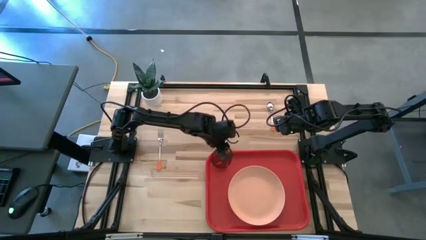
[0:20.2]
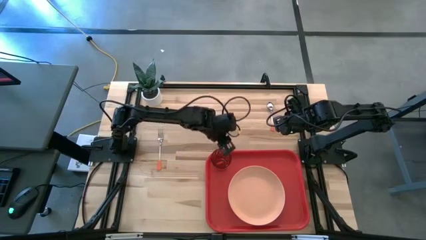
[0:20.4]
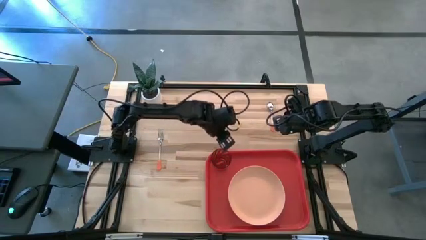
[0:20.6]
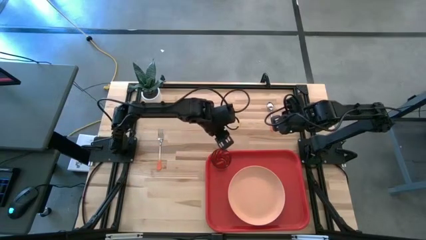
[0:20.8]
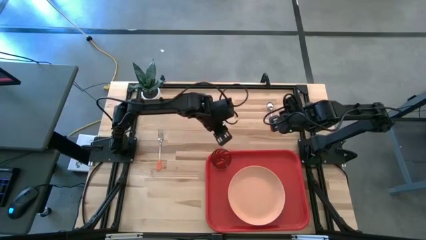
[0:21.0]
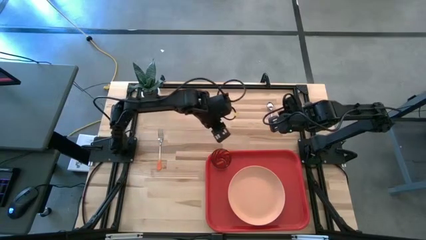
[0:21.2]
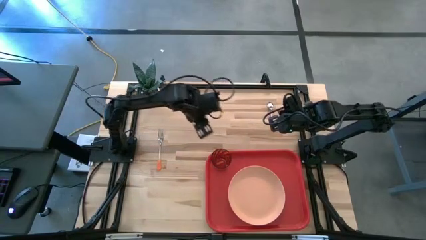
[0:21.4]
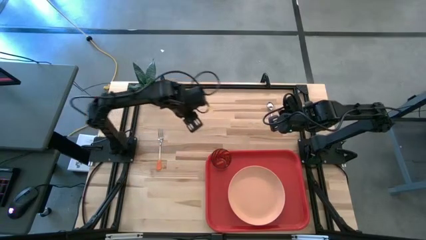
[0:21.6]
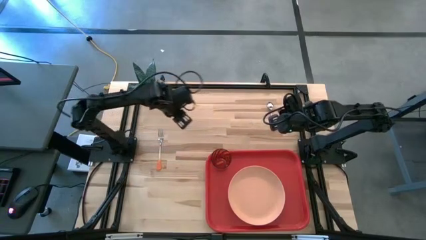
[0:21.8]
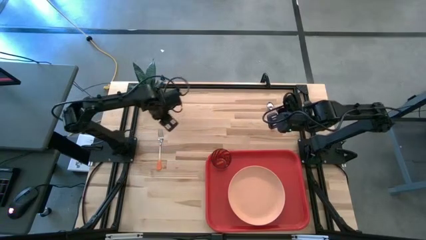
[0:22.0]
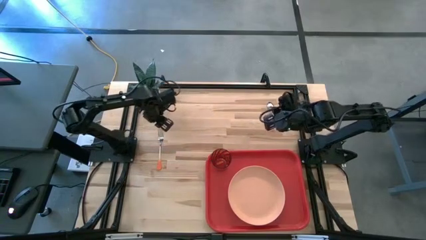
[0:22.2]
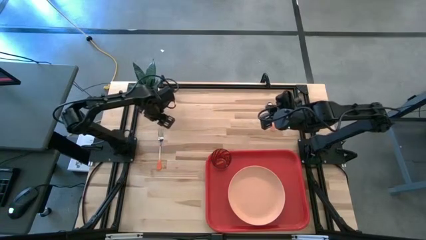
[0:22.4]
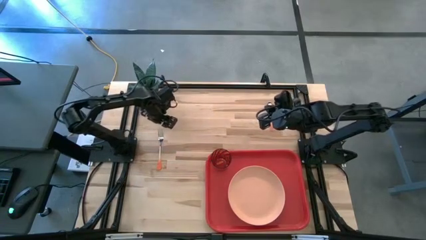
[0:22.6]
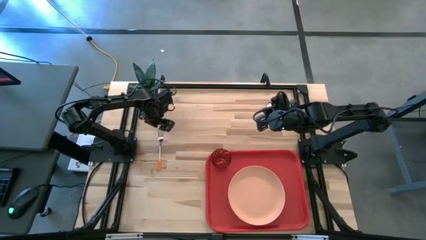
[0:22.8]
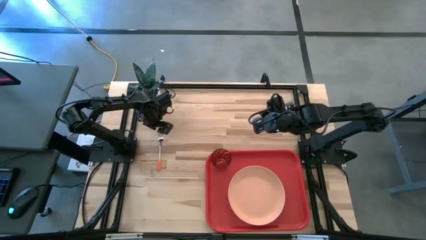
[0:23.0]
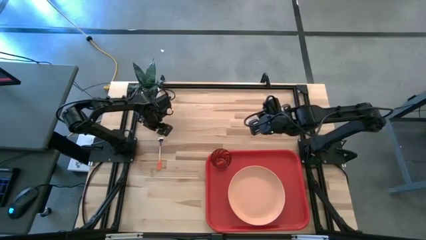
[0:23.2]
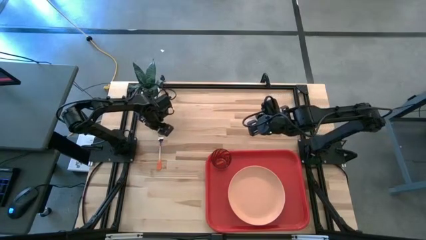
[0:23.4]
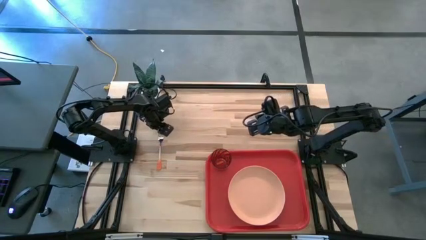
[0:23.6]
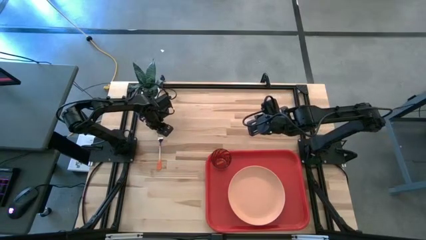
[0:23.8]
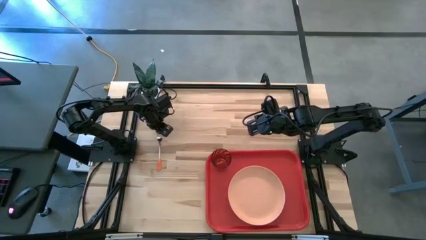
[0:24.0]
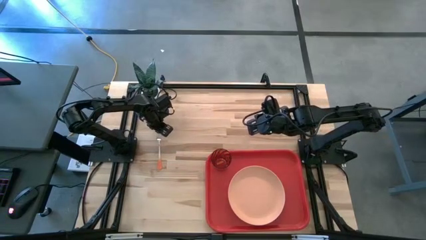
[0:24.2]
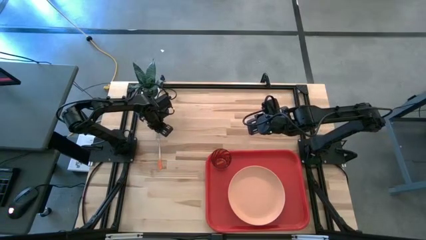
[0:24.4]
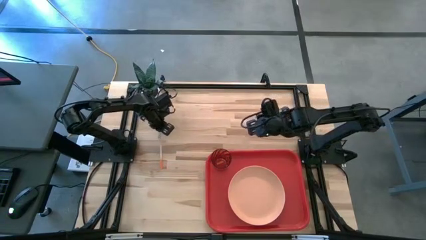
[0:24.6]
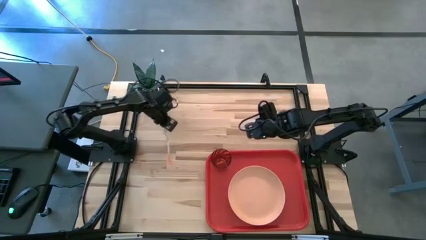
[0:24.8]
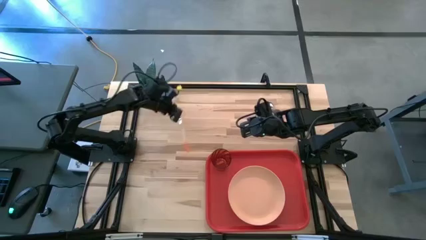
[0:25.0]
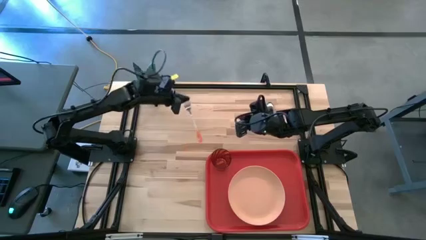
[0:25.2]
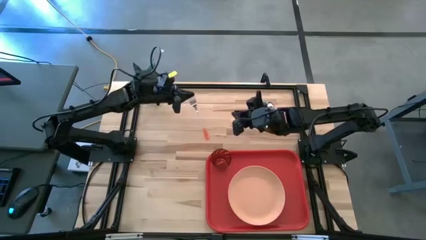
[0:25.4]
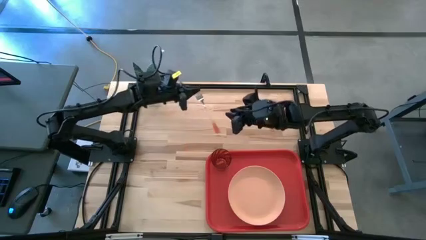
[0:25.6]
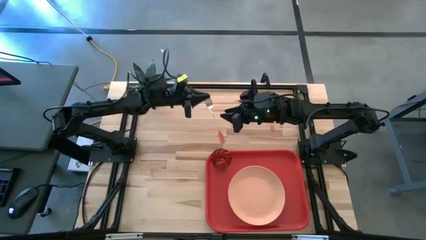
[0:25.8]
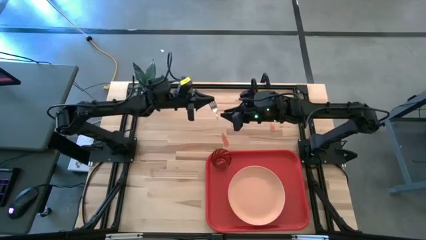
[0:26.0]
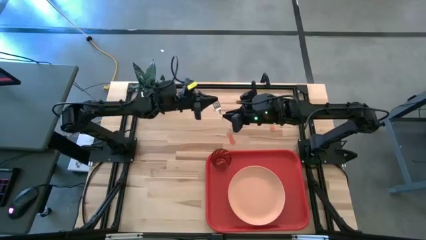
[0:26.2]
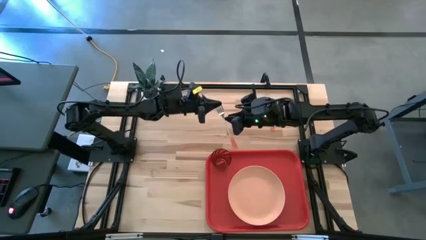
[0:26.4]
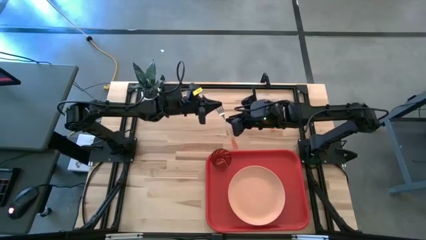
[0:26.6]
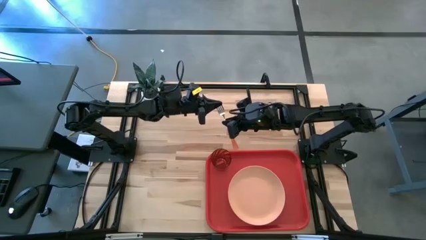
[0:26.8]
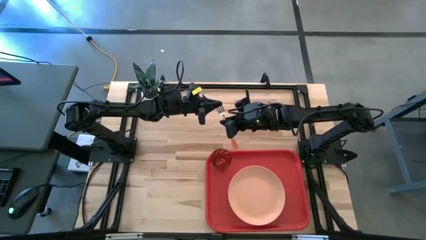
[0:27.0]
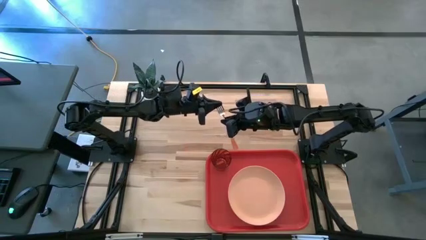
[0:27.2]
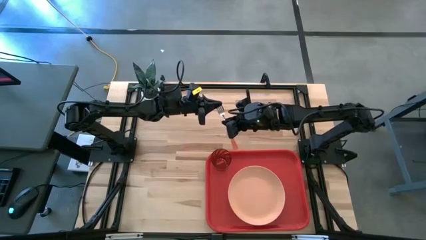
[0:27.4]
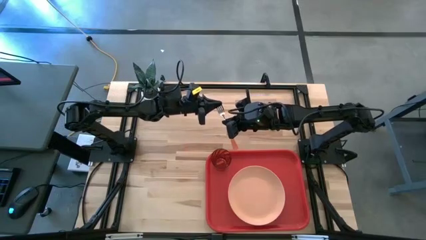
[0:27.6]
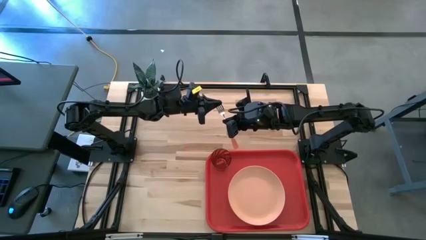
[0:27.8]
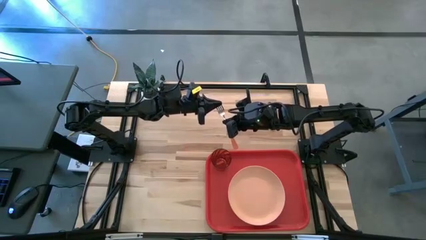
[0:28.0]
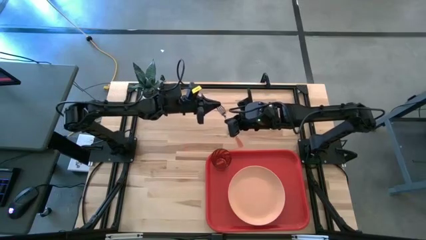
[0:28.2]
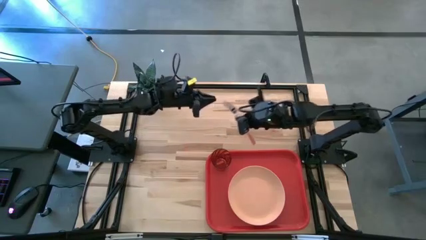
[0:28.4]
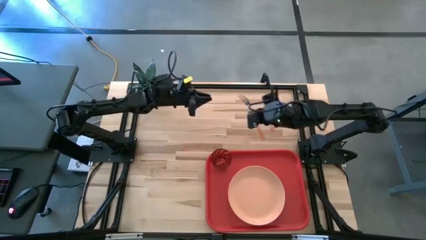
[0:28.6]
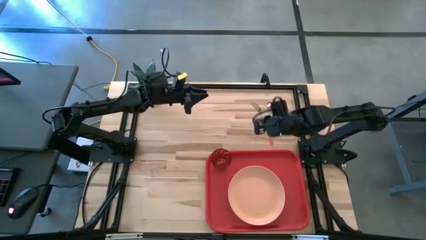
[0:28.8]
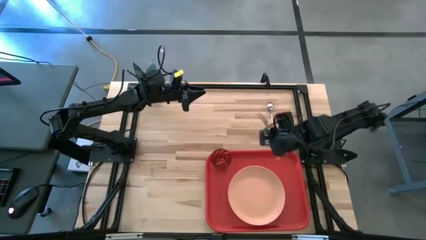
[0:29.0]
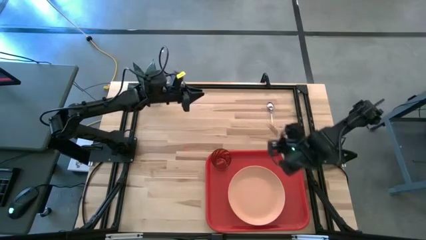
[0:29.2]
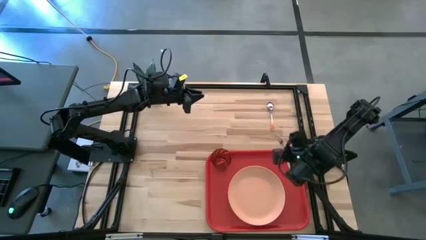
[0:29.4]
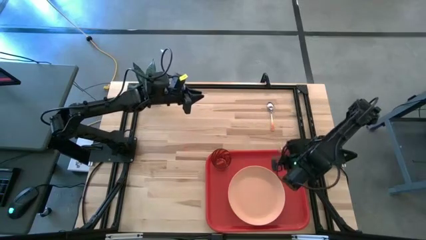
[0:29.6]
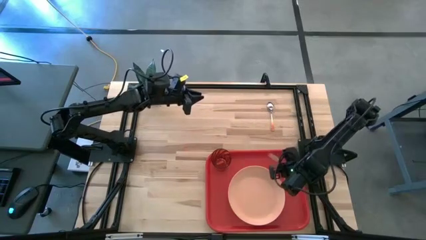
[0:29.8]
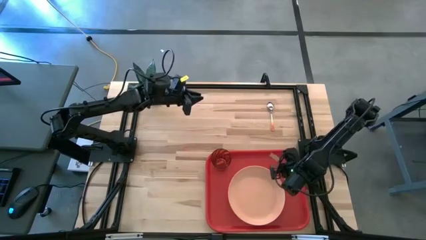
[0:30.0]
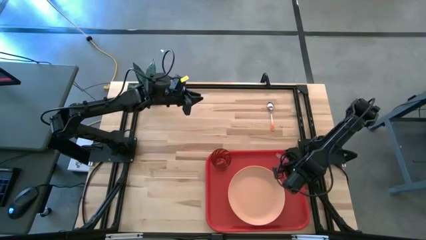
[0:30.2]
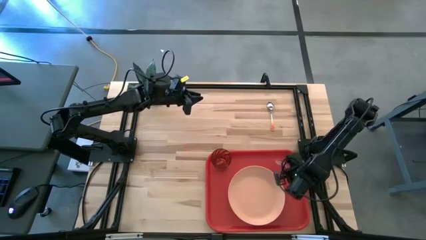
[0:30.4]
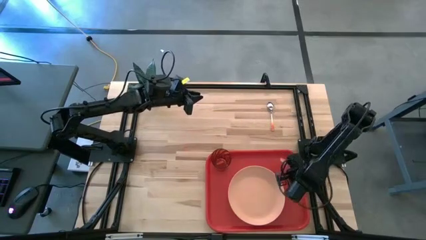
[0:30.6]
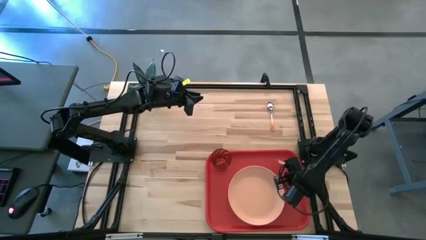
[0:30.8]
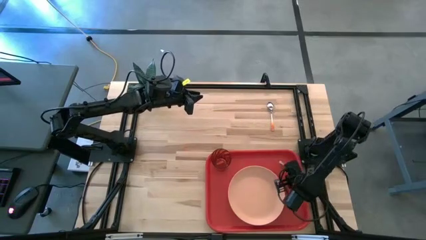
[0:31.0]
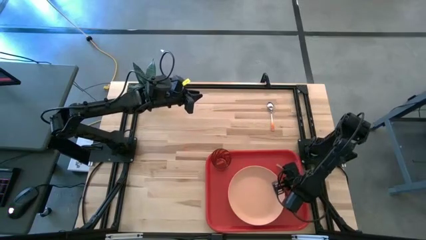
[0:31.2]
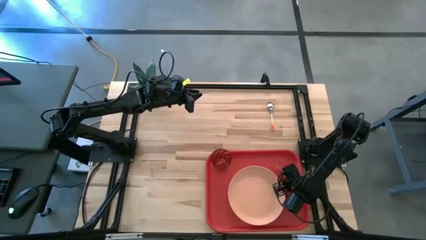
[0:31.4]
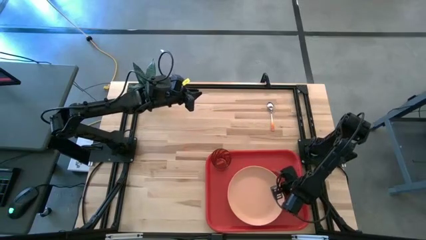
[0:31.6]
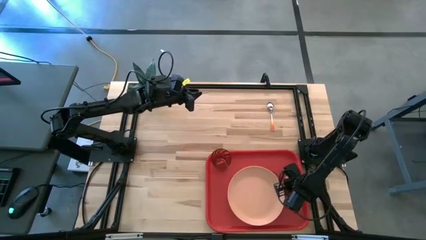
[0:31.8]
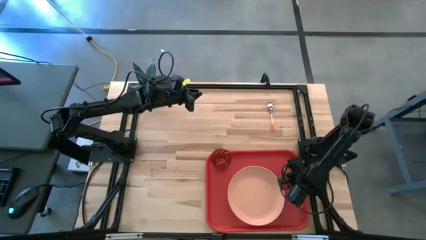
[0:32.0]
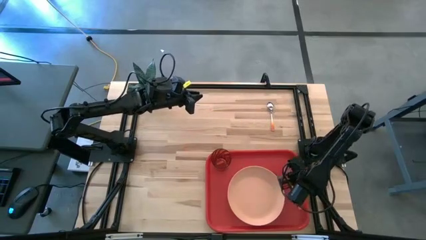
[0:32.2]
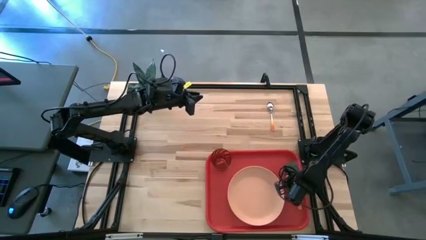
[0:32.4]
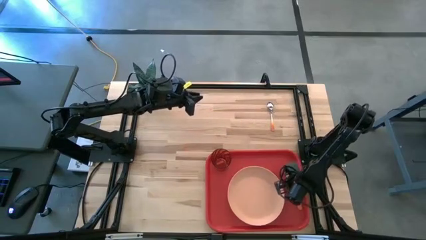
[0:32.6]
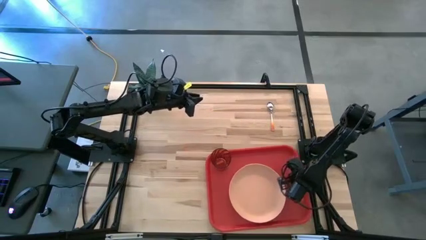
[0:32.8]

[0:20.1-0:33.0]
Task: Pick and place plate/cup/fork/spoon on tray
Put the orange fork to the right of the light orange plate on the red tray

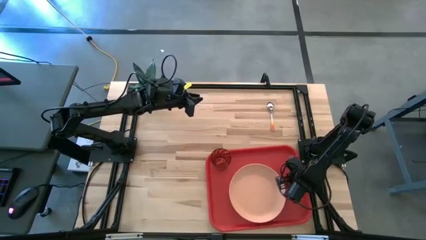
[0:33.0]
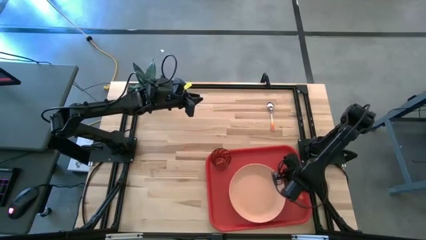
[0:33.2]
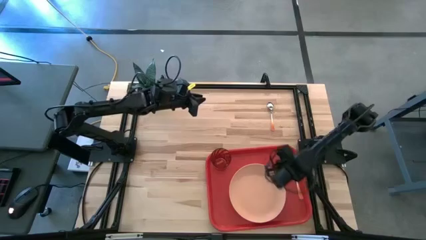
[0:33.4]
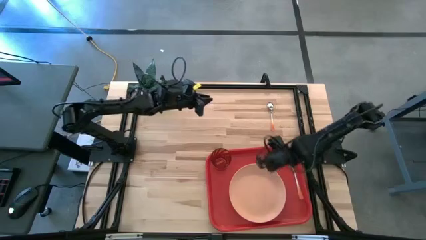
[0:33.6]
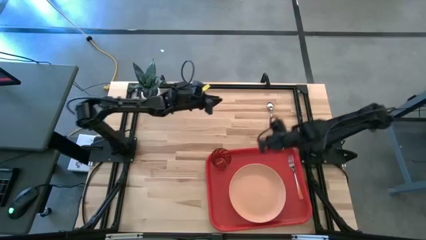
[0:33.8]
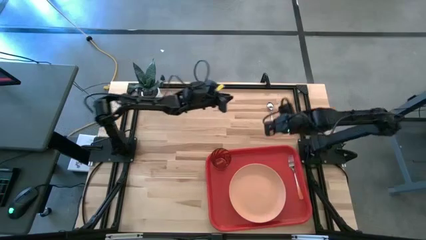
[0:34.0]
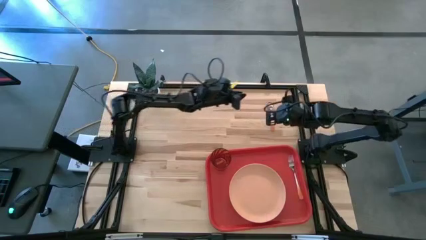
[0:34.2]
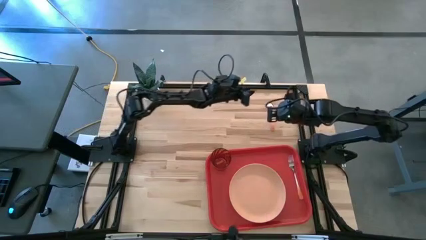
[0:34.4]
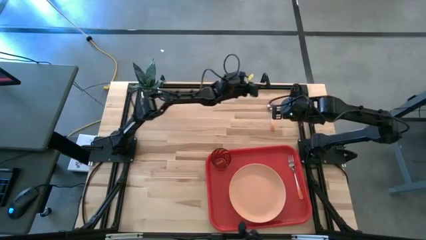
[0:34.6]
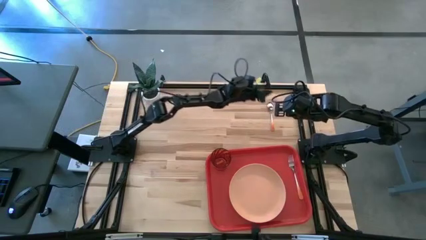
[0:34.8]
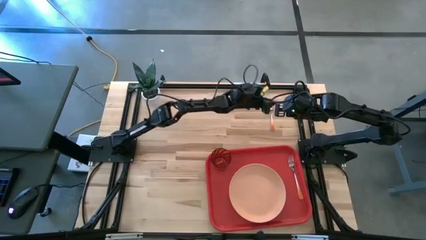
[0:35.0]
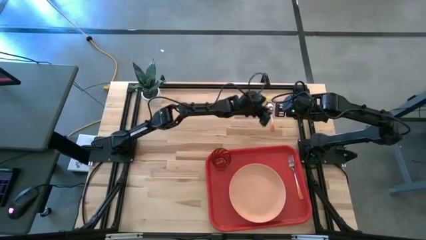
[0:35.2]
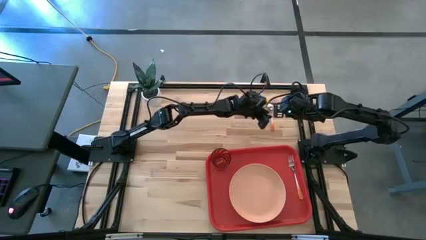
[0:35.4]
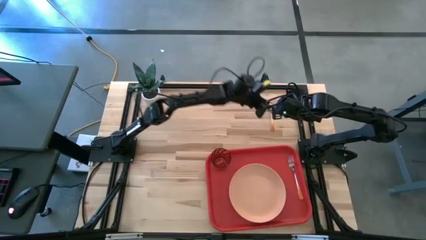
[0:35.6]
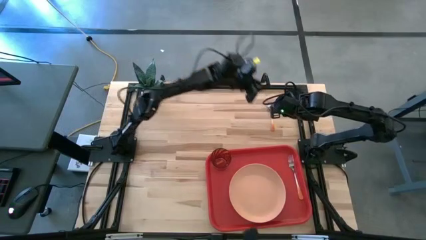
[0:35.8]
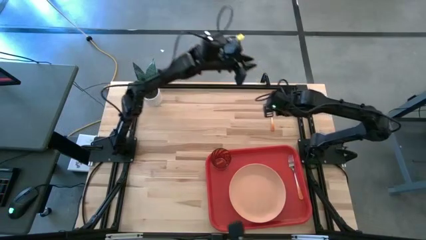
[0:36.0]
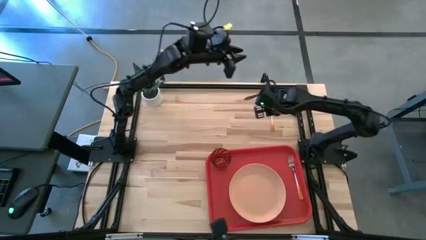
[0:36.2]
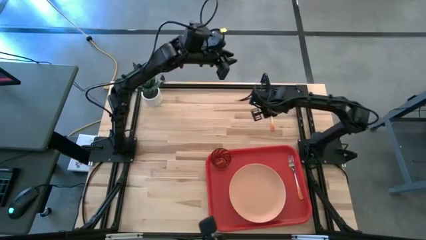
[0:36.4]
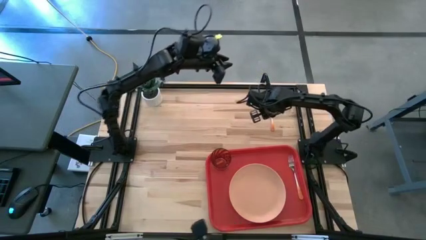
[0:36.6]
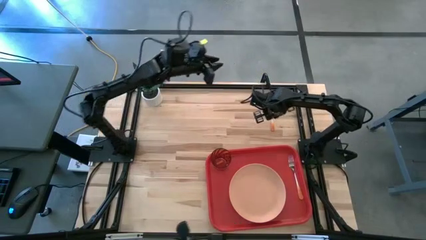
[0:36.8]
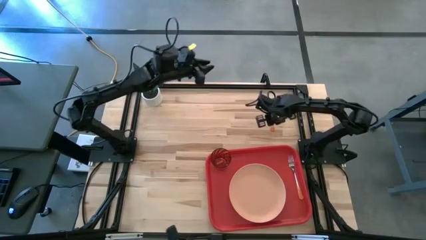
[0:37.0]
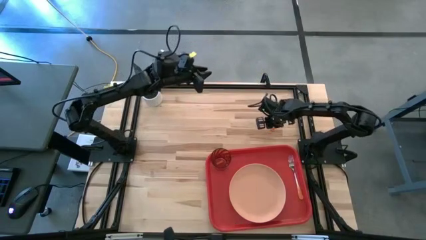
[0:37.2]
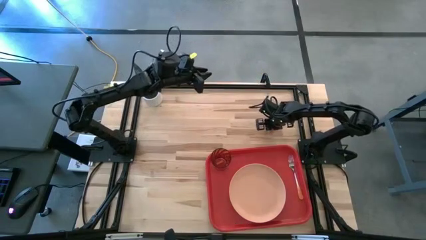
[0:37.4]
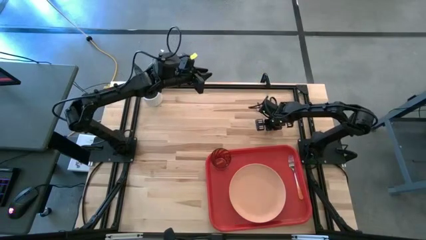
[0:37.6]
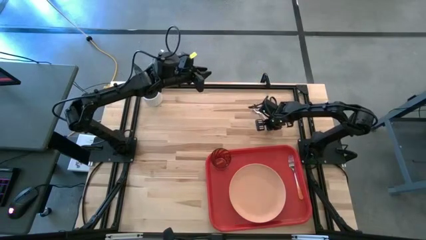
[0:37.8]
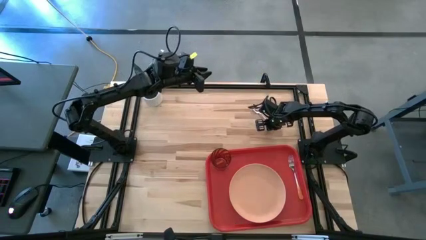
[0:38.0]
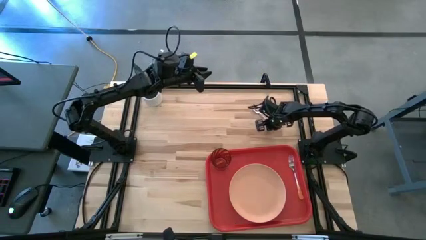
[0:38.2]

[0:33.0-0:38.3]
Put the orange spoon to the left of the orange fork on the red tray
